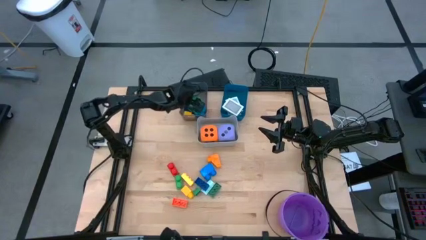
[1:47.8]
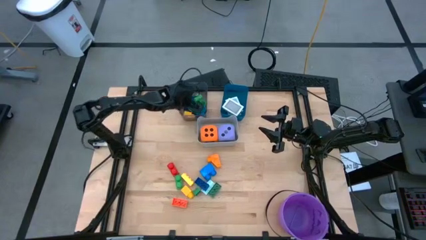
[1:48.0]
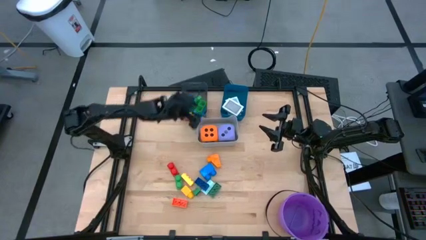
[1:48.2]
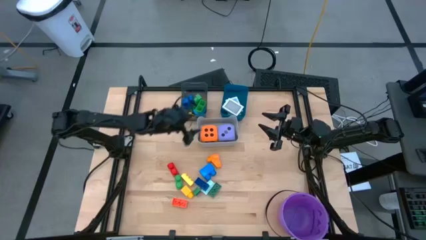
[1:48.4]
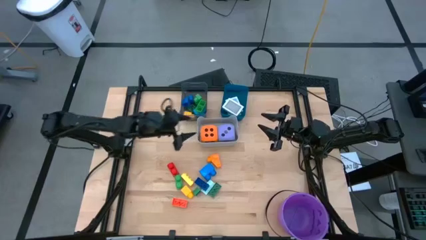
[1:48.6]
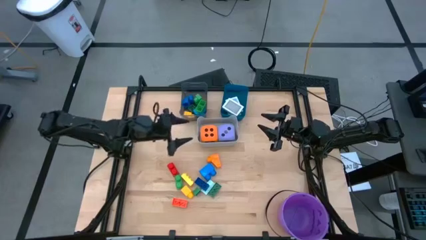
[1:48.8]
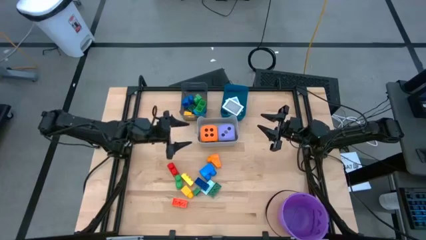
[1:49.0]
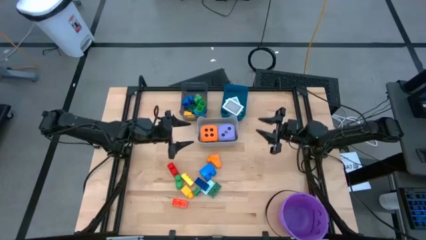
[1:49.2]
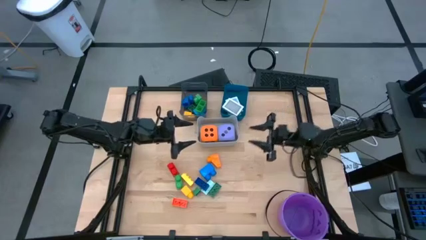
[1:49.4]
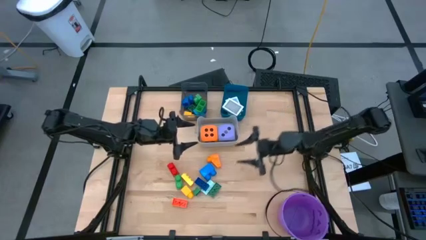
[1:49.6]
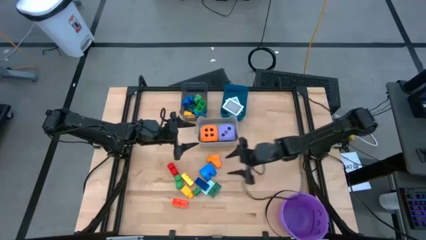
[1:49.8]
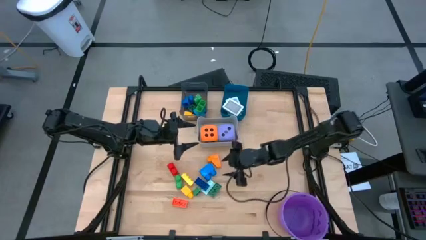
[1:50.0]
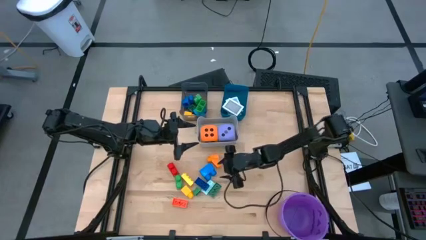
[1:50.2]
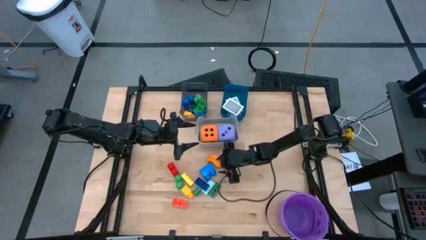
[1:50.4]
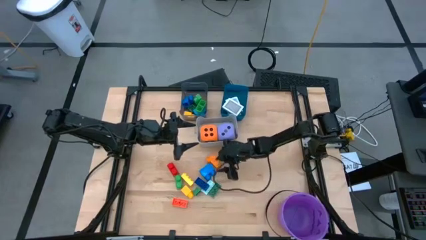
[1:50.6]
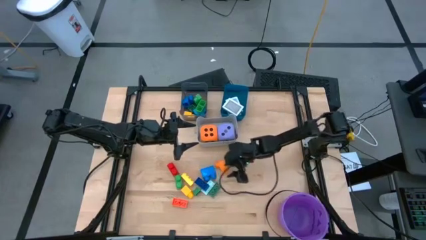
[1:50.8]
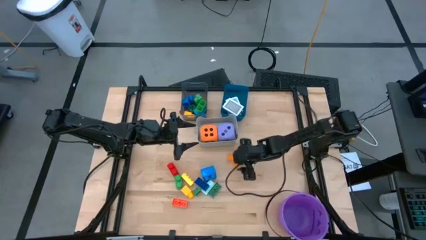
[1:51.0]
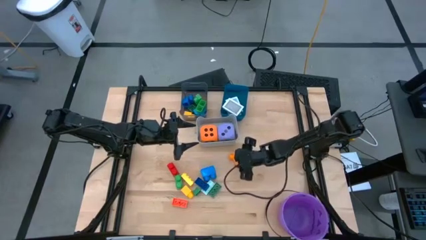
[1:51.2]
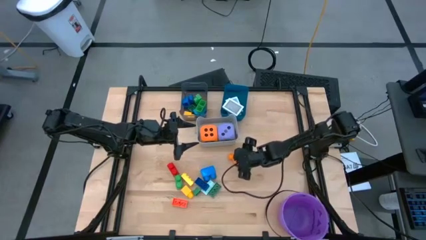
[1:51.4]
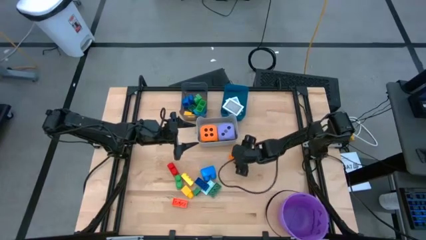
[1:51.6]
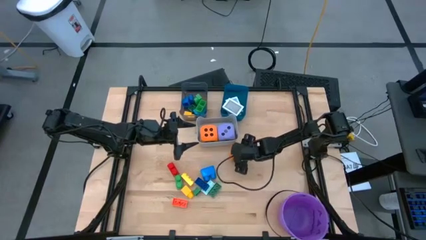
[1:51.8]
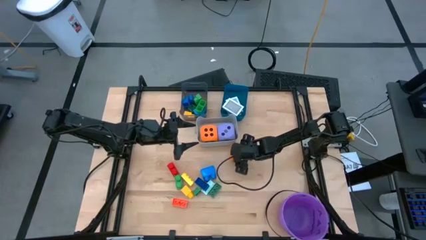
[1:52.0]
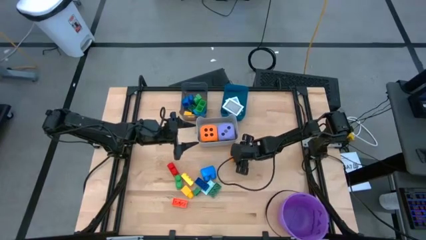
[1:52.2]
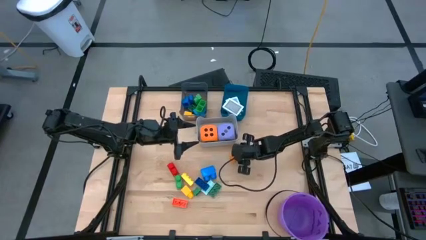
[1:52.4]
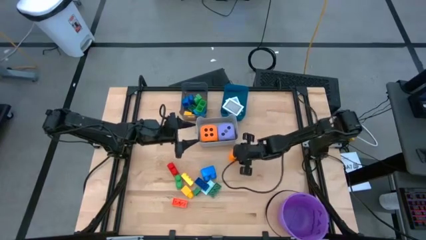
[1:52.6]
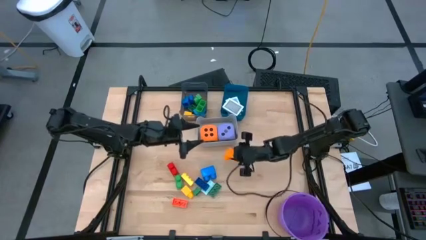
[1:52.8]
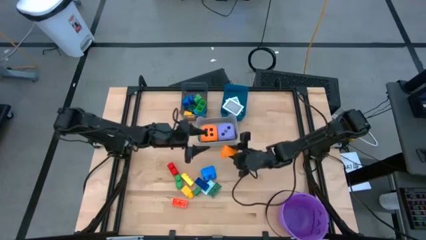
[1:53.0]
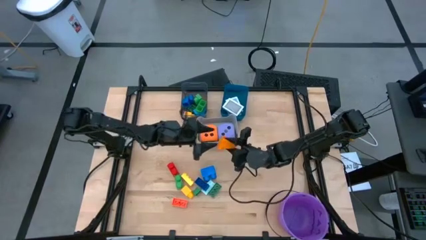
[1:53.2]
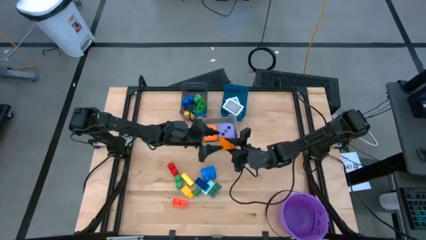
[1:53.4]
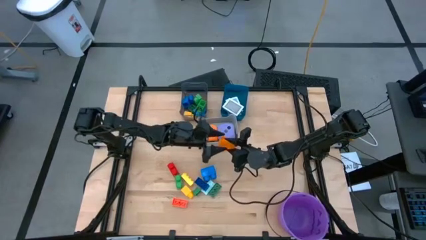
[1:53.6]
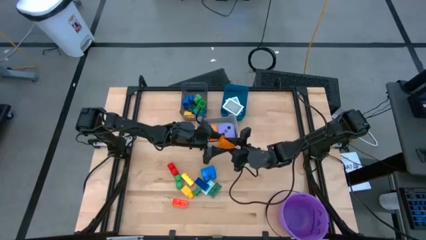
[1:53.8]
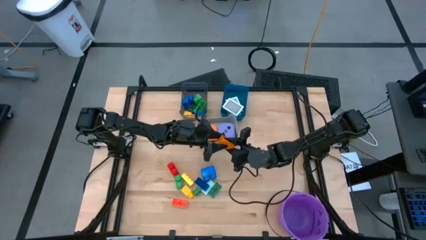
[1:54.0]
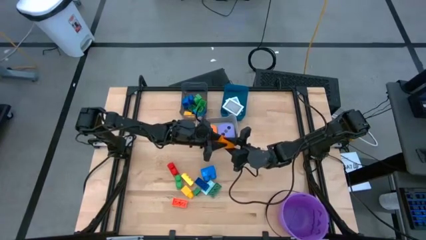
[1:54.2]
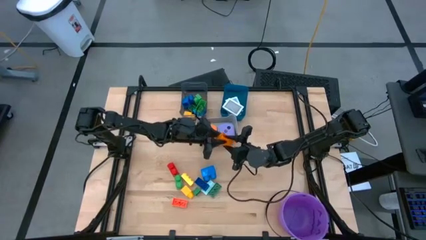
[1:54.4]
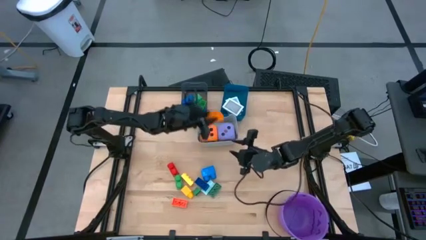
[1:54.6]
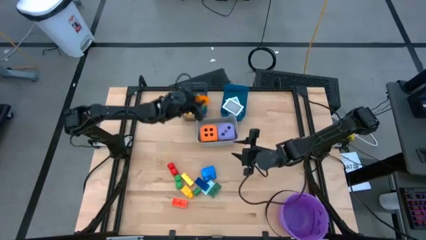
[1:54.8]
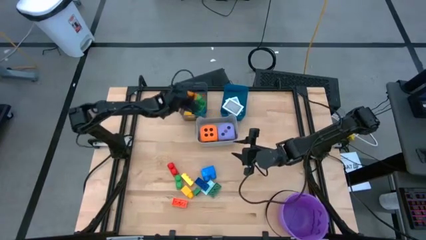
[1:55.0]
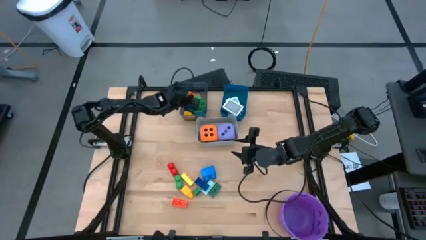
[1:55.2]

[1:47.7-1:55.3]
Task: Pick & Place Toys
Put the orange game piece into the black bin

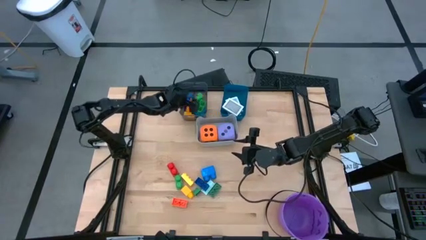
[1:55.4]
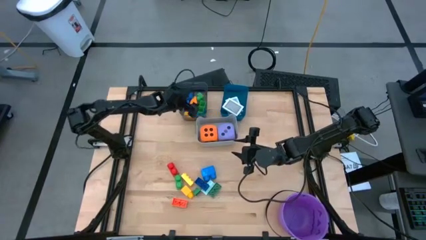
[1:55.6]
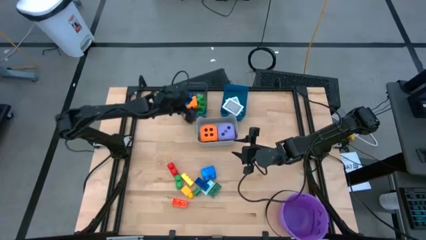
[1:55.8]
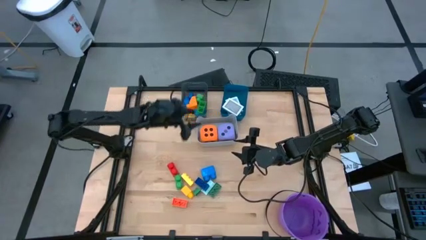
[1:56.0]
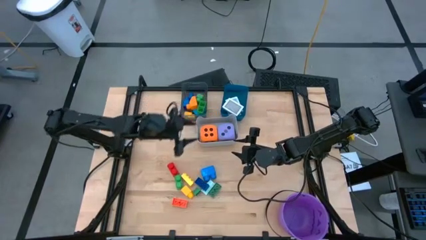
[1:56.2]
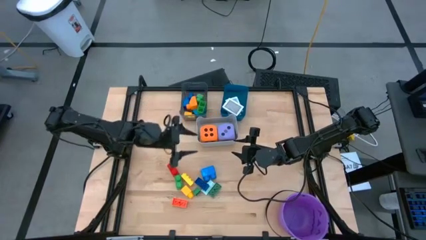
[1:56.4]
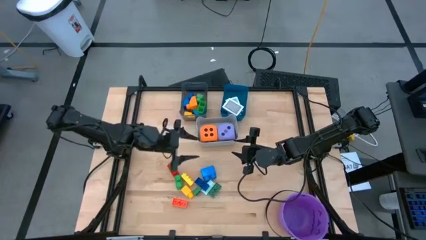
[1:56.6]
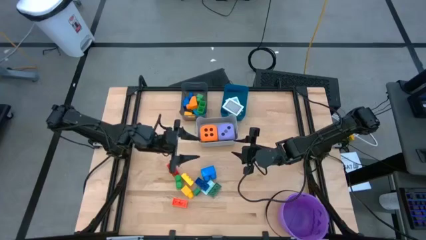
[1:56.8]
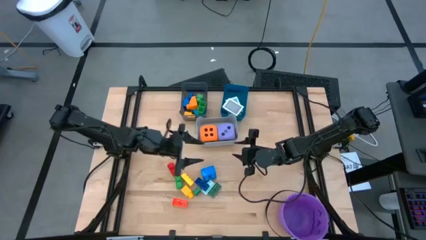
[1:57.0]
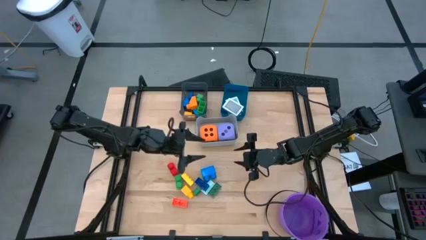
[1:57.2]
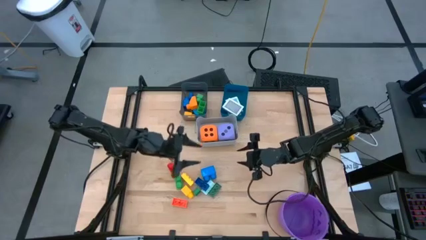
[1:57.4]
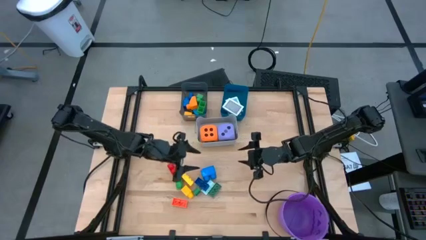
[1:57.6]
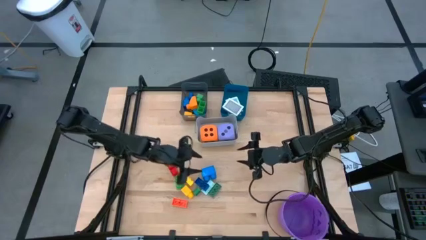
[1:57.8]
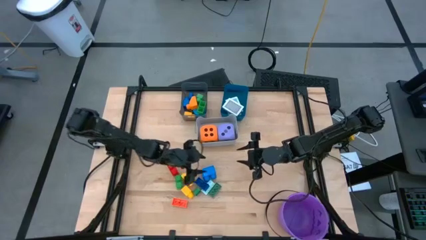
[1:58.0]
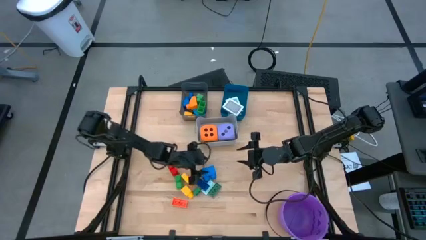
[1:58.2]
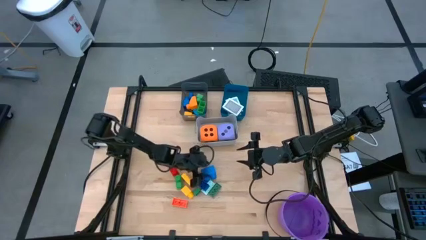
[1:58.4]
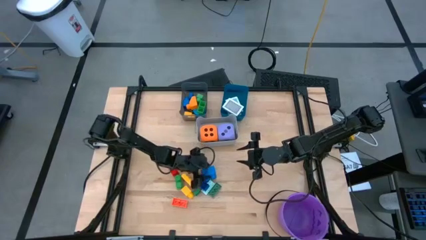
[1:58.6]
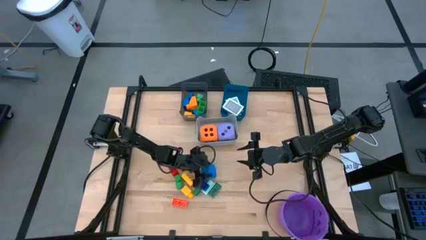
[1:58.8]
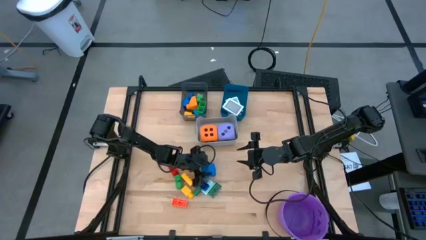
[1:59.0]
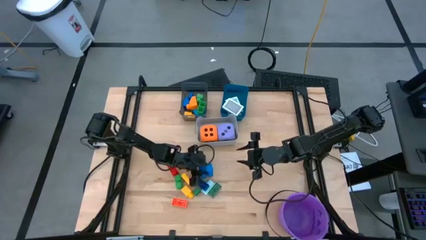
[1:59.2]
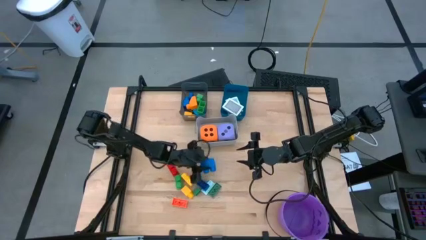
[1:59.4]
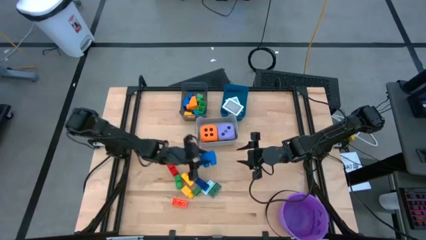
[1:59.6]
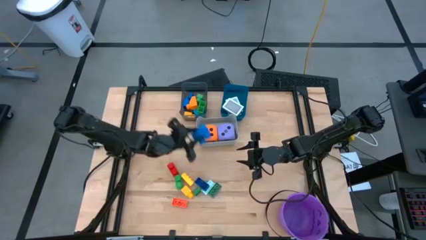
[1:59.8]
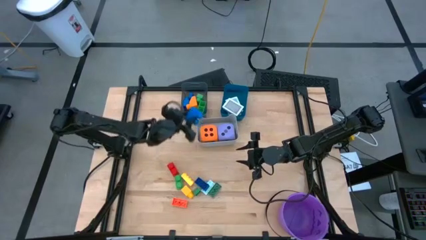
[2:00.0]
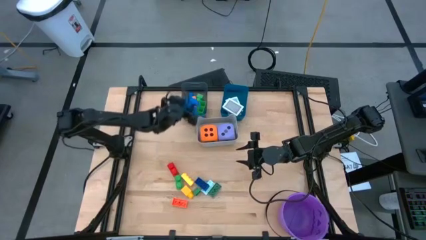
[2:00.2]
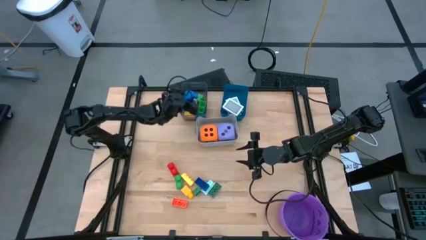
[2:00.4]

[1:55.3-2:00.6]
Put the blue game piece into the black bin
